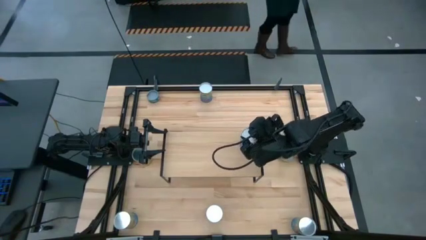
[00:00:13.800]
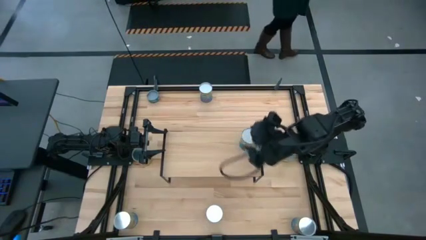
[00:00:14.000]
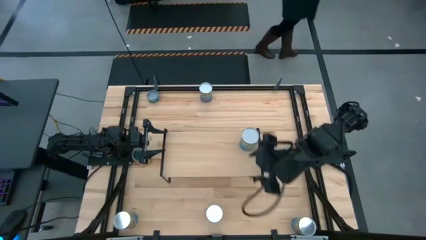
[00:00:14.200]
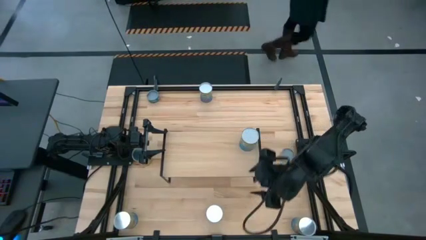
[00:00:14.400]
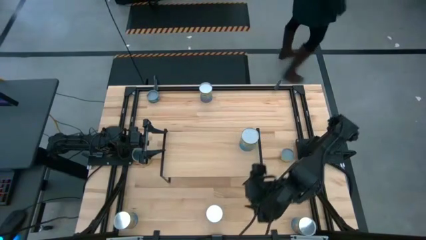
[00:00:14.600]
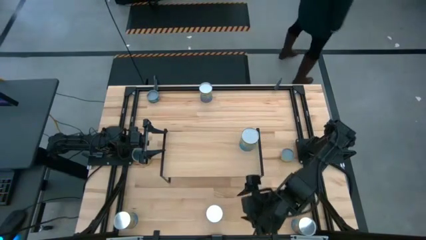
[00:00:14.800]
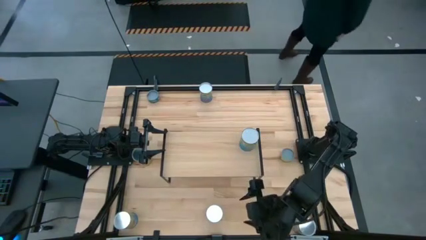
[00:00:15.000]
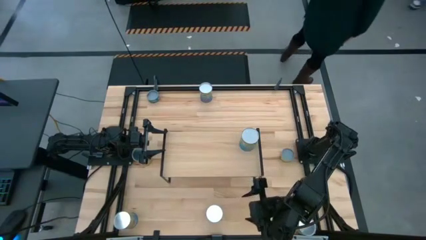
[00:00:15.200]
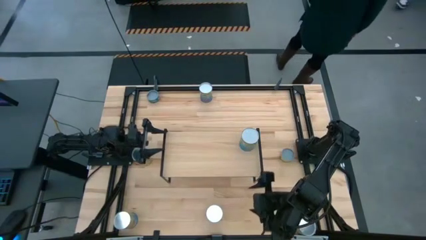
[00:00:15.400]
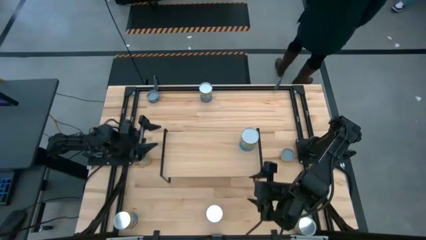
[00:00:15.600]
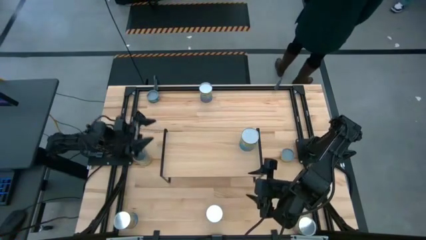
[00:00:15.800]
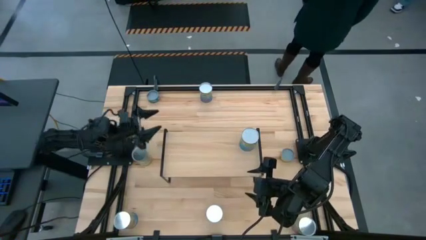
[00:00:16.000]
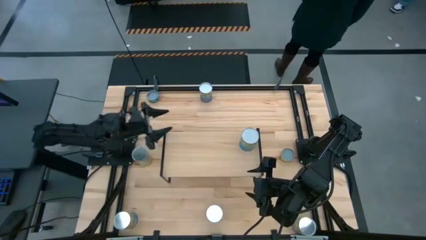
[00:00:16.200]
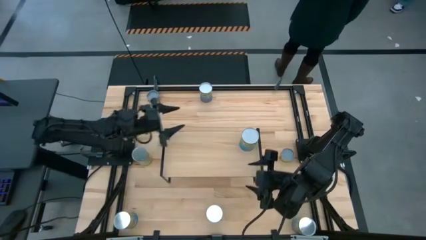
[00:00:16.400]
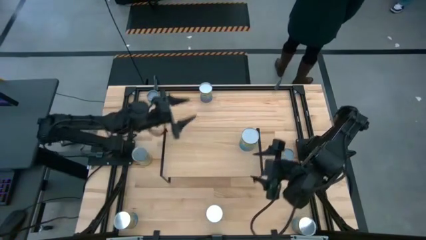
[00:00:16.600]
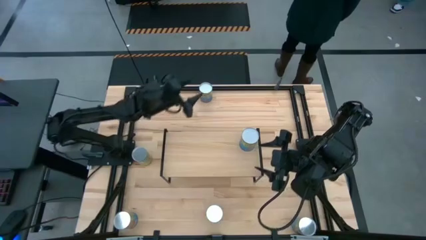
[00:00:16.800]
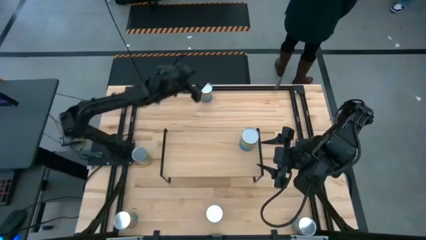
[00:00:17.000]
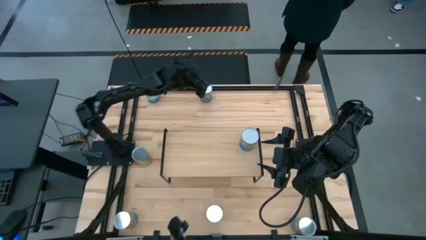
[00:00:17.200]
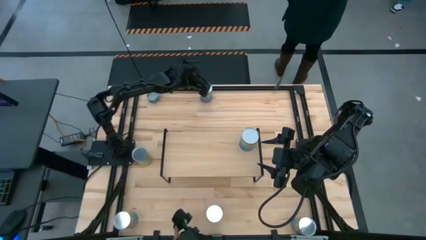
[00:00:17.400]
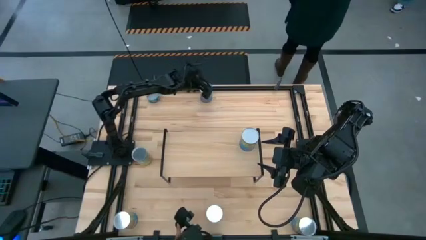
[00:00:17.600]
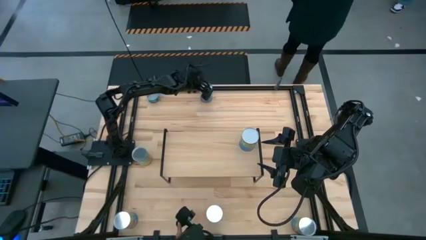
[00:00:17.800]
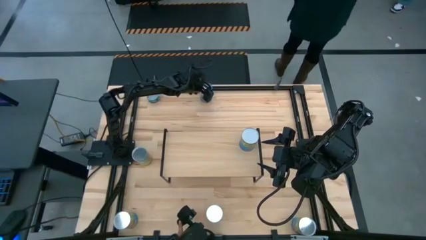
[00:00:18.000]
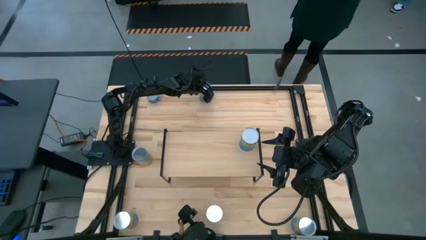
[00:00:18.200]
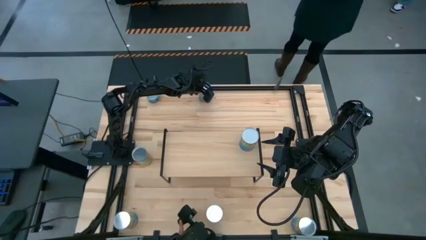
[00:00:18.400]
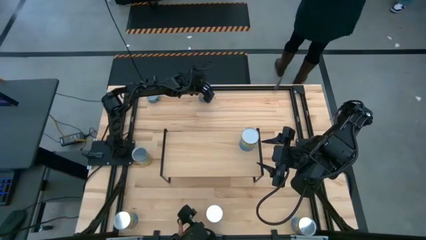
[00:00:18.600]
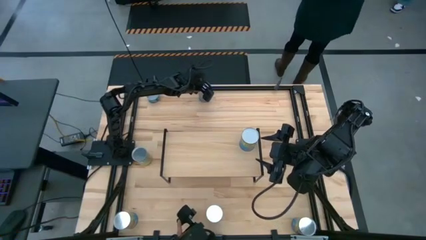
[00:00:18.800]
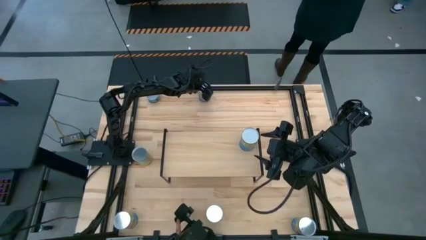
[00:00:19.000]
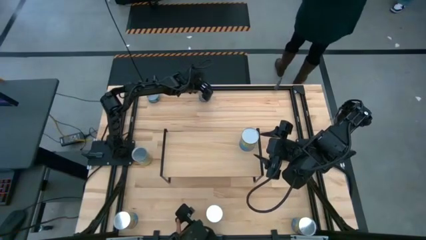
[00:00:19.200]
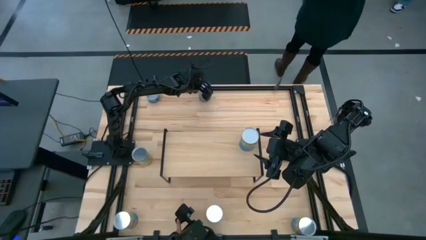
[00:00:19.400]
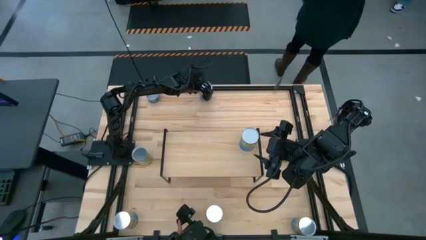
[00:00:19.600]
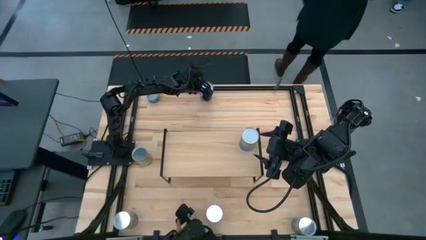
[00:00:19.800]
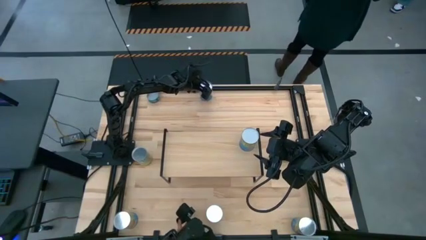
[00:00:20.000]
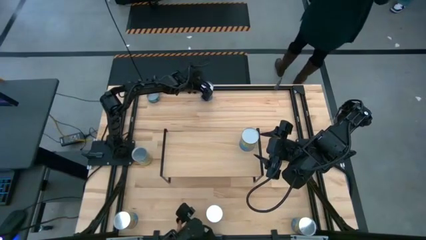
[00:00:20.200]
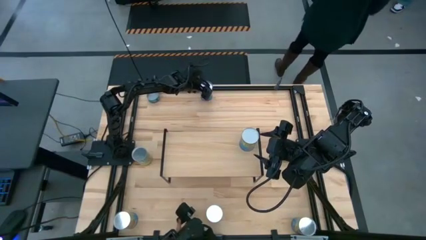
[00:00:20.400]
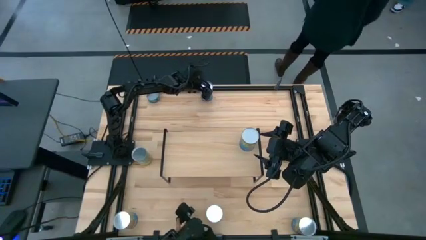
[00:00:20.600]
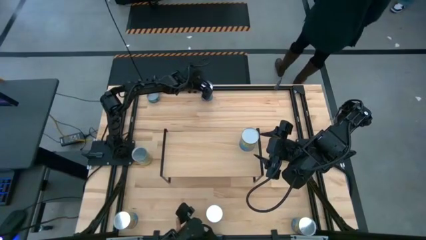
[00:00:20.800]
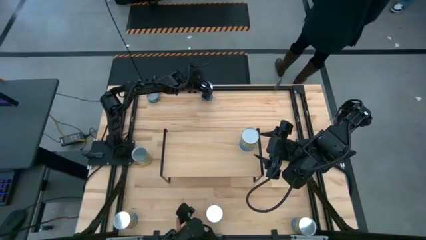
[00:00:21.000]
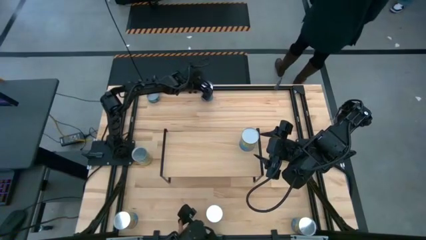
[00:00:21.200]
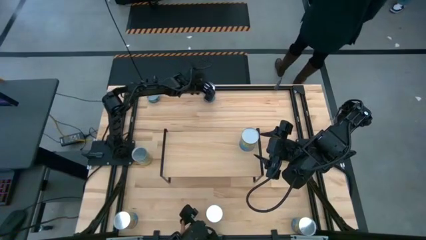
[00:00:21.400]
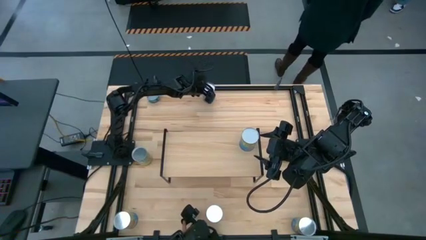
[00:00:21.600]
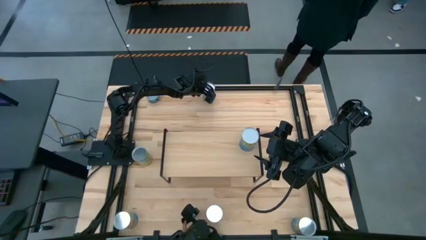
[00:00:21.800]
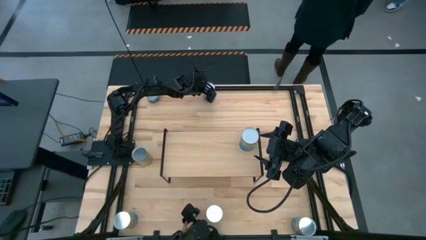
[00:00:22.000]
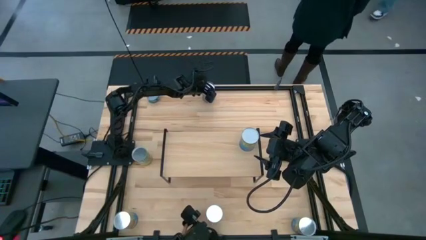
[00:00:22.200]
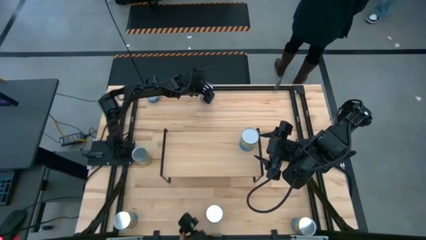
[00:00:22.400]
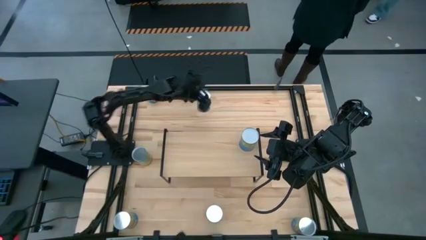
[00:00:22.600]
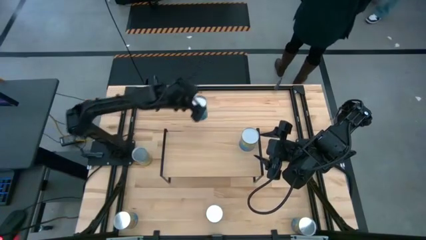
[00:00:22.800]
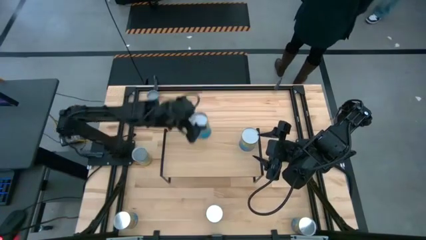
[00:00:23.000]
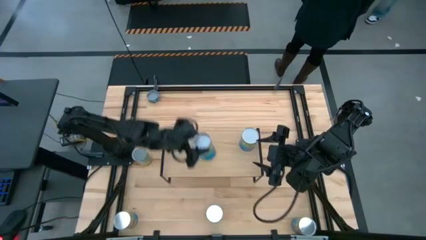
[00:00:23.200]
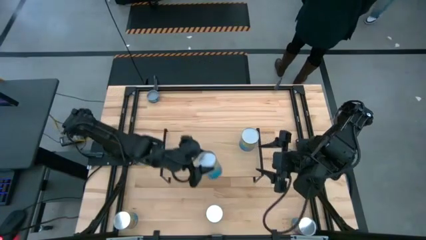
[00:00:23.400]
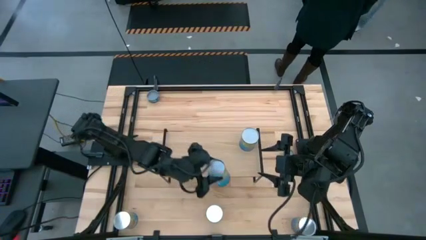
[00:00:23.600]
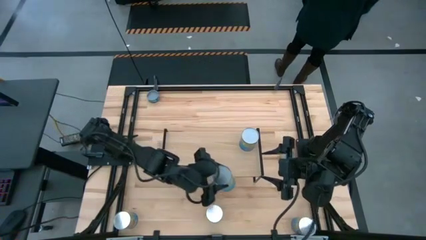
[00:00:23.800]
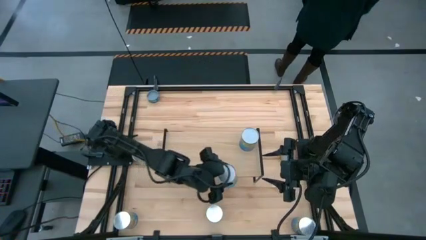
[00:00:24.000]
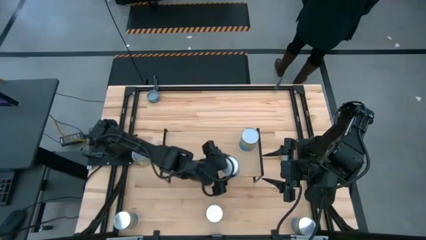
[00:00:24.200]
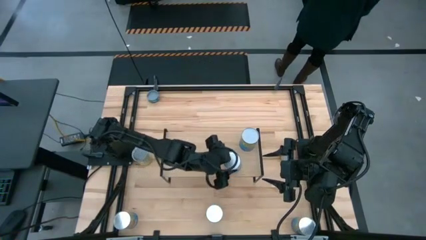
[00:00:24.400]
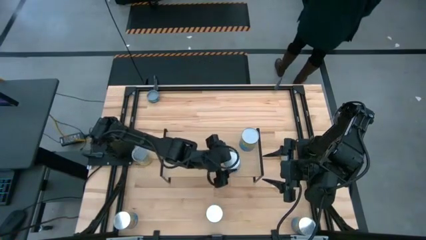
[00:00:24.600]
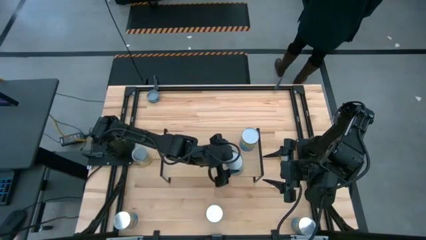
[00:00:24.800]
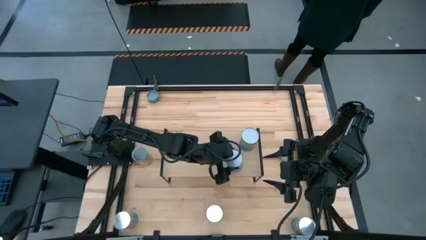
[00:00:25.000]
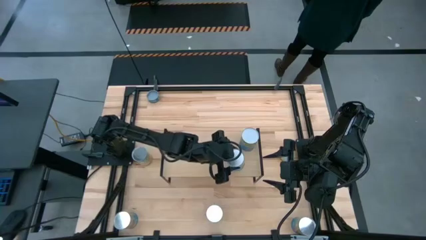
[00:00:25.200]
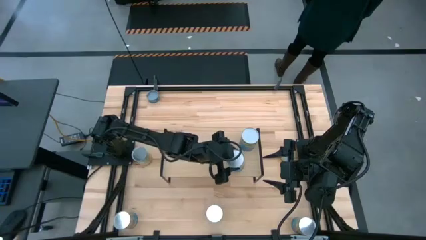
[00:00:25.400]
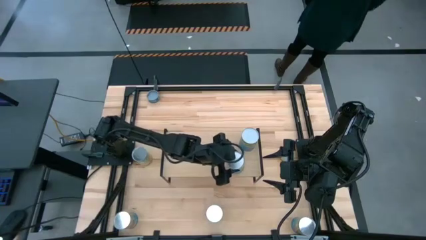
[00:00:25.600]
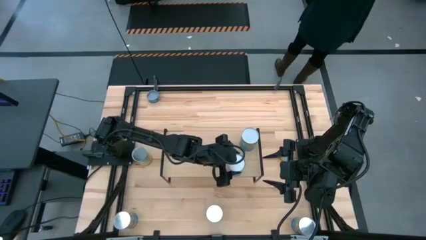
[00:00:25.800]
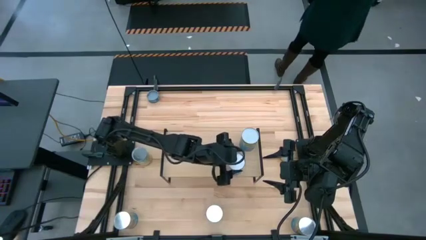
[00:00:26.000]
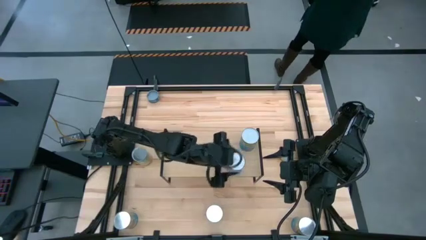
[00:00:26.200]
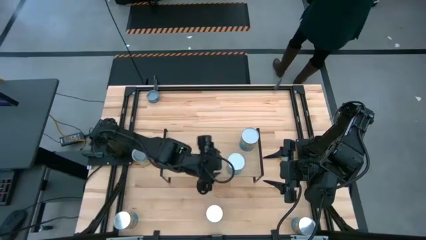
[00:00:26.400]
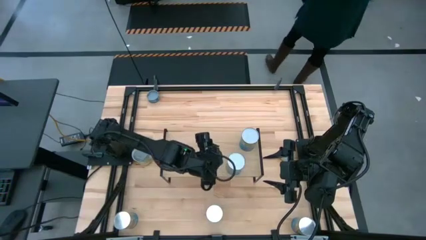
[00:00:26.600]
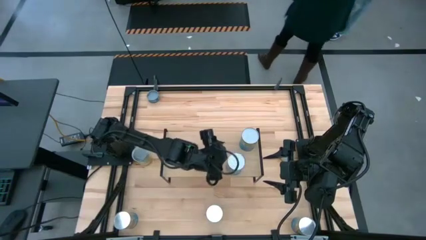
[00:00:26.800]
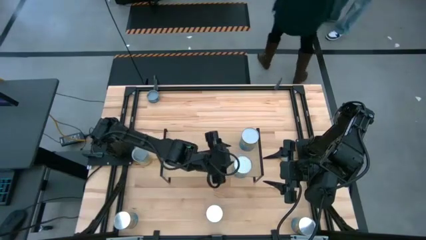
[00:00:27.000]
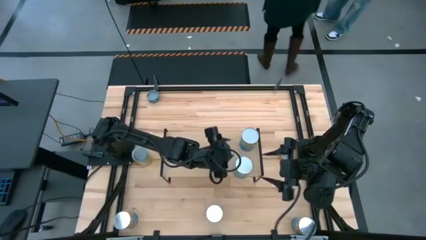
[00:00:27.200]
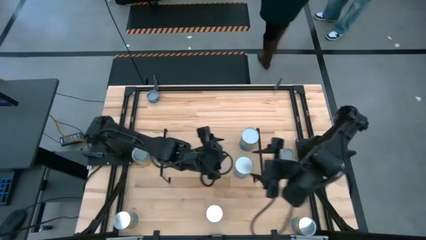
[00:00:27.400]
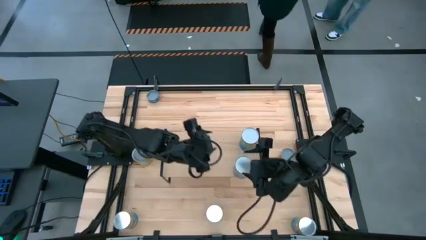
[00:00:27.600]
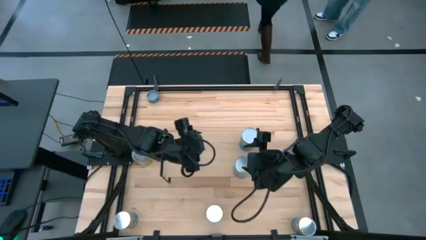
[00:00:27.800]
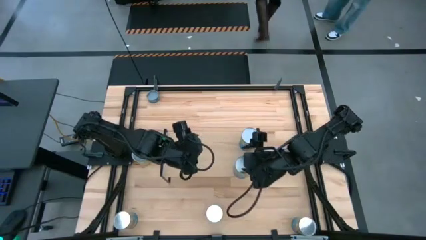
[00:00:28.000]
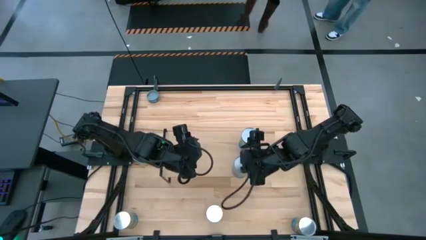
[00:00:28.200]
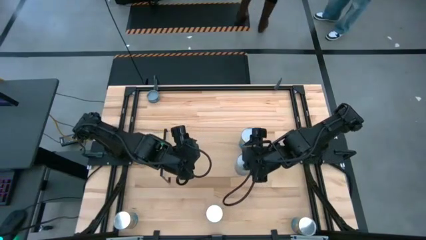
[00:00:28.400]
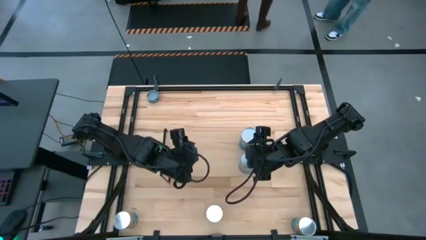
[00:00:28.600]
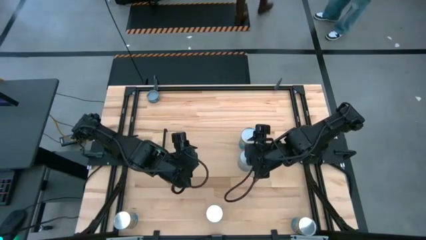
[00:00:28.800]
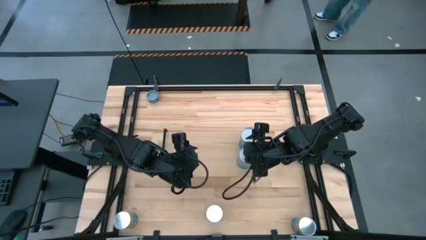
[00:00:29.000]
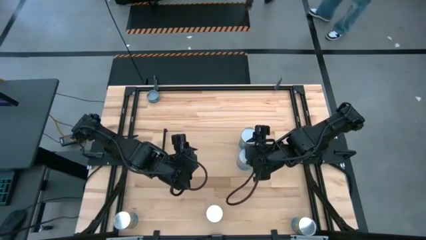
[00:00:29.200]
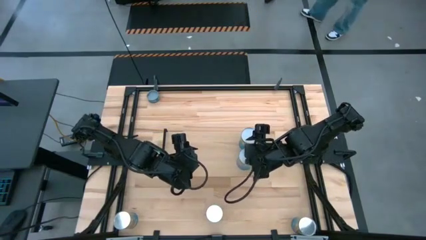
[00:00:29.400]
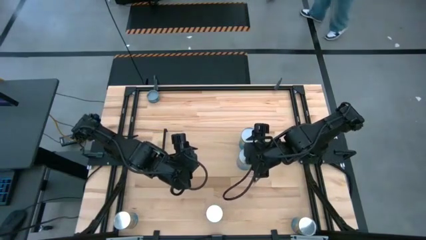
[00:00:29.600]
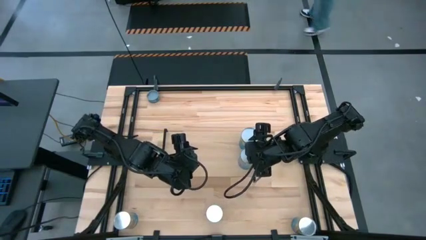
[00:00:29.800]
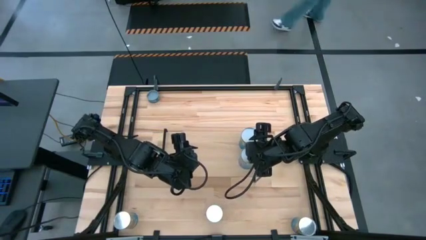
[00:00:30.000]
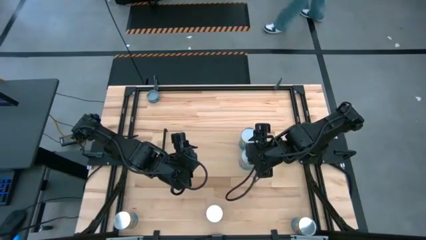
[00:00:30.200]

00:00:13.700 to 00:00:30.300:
Task: Pick and place cans onto a shelf
Put the canned cherries on the shelf aligned with the other canned cherries
